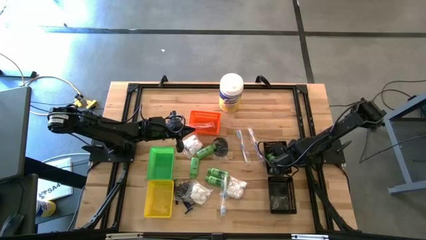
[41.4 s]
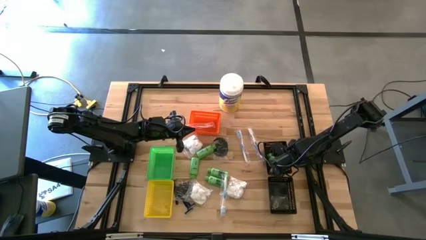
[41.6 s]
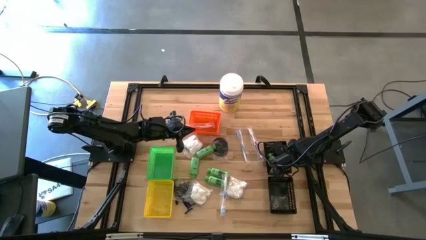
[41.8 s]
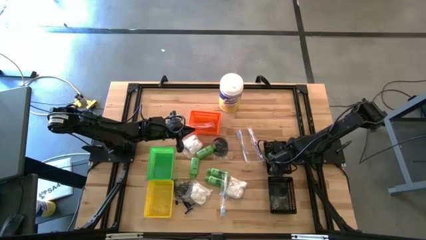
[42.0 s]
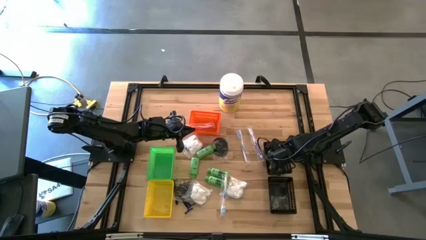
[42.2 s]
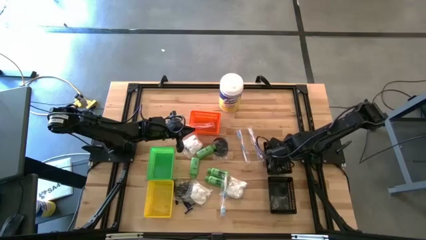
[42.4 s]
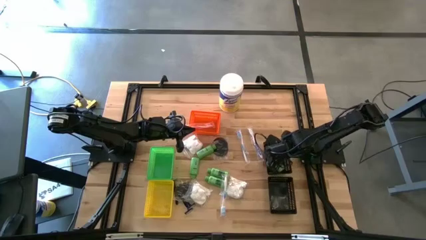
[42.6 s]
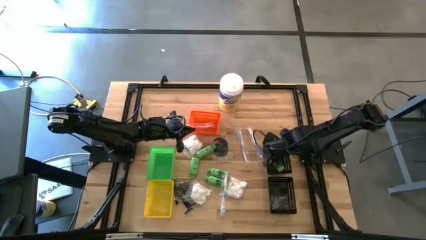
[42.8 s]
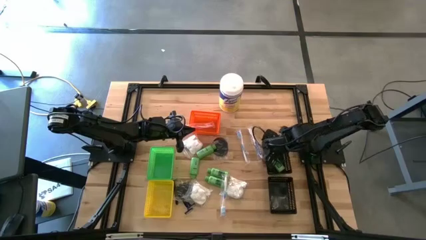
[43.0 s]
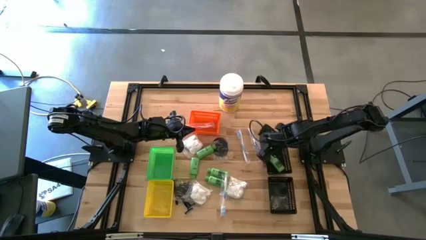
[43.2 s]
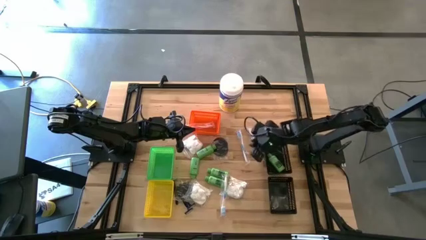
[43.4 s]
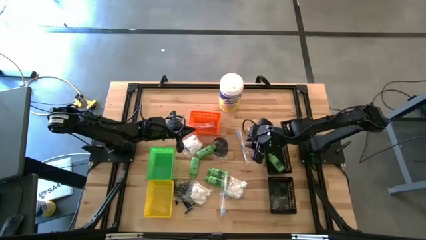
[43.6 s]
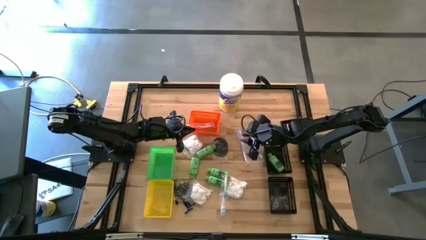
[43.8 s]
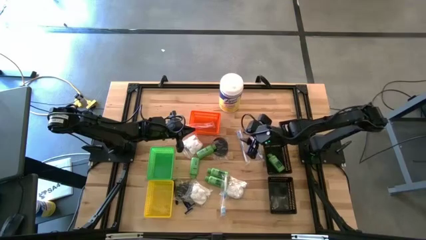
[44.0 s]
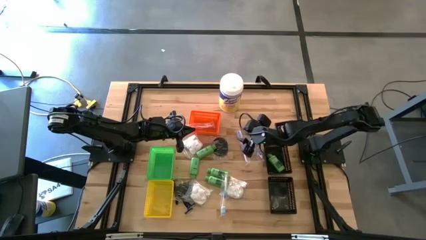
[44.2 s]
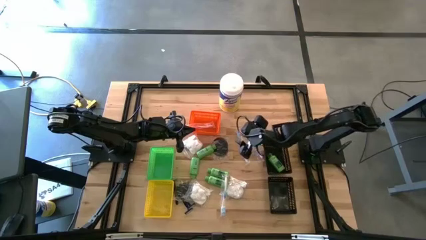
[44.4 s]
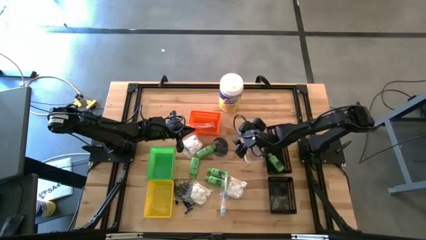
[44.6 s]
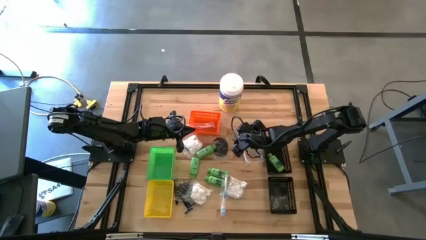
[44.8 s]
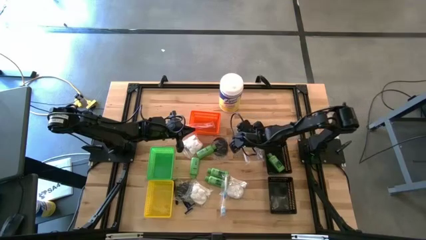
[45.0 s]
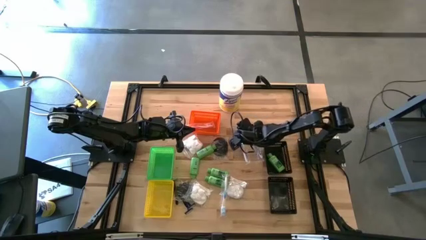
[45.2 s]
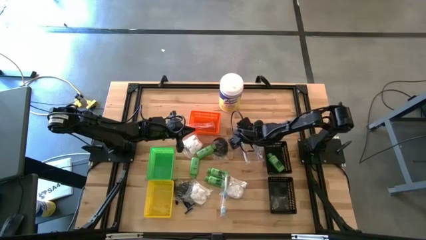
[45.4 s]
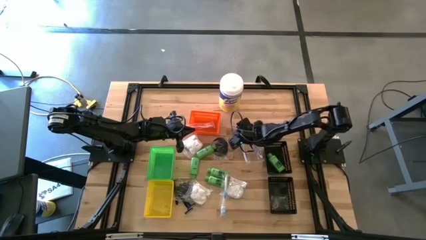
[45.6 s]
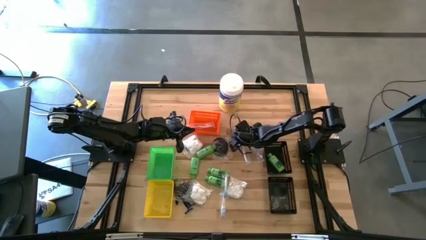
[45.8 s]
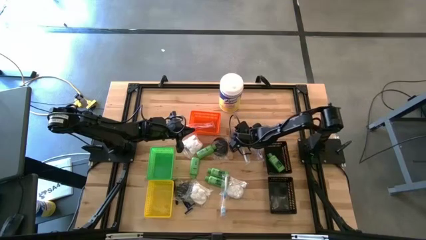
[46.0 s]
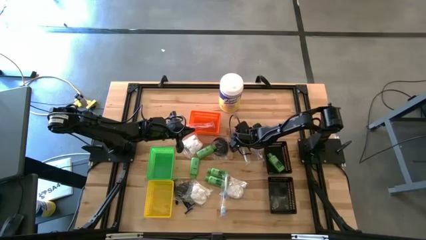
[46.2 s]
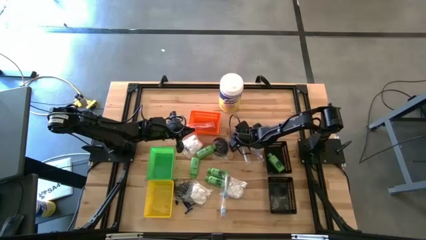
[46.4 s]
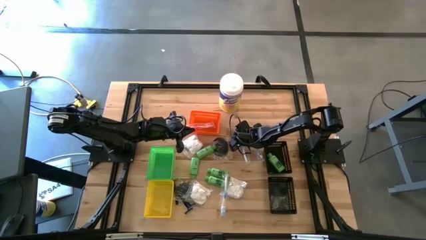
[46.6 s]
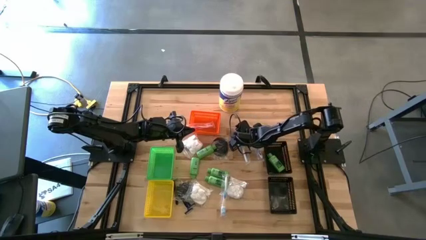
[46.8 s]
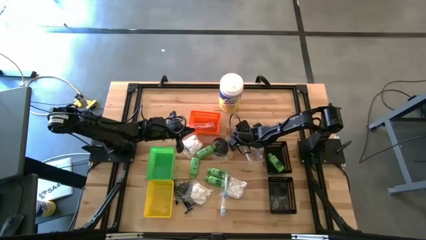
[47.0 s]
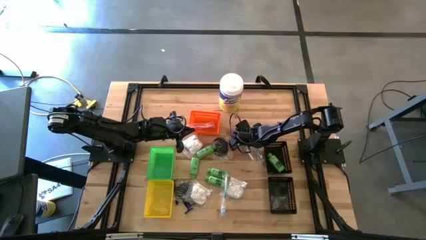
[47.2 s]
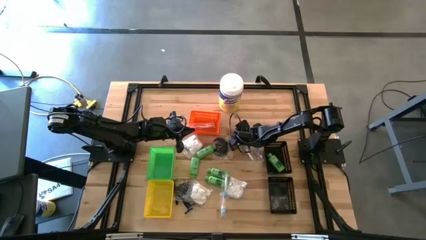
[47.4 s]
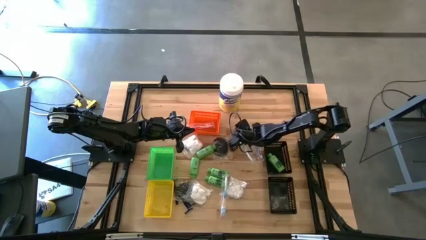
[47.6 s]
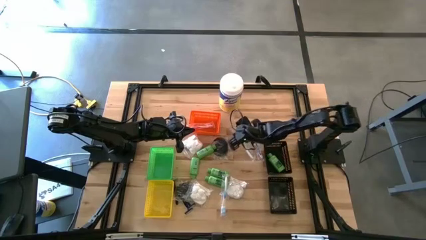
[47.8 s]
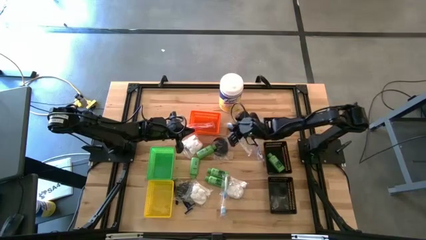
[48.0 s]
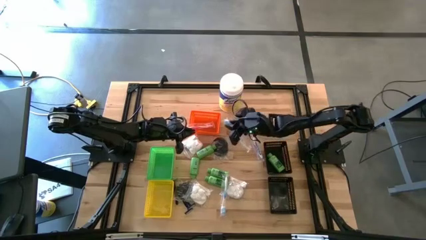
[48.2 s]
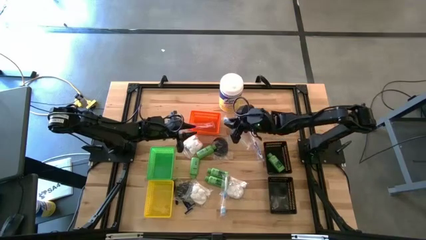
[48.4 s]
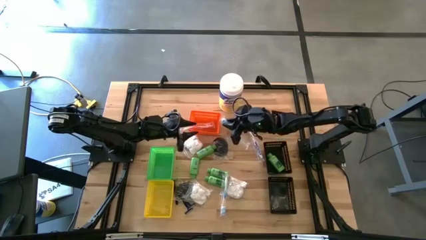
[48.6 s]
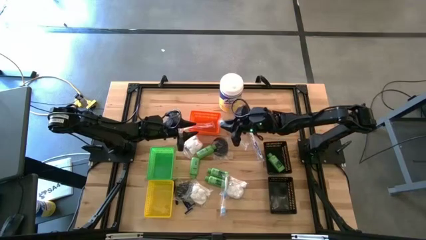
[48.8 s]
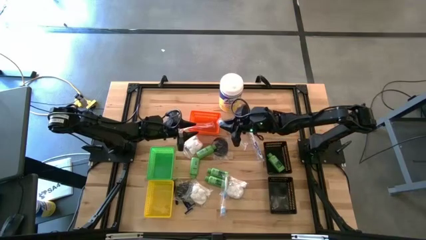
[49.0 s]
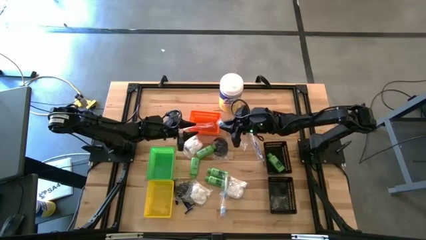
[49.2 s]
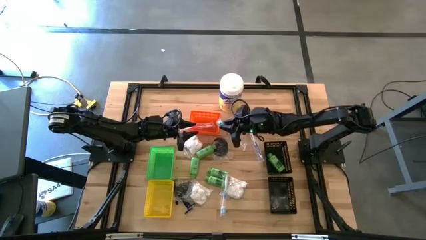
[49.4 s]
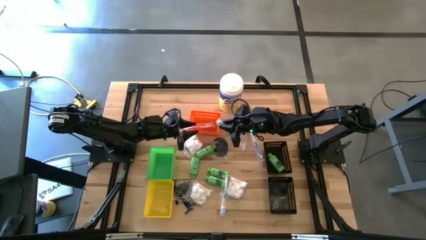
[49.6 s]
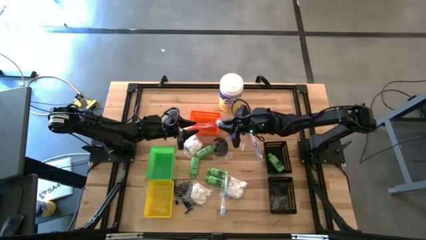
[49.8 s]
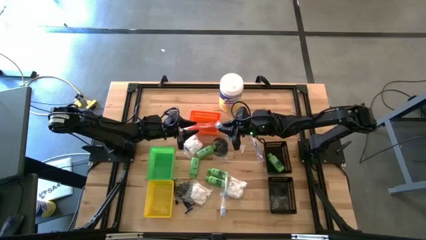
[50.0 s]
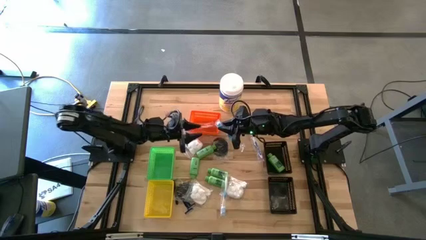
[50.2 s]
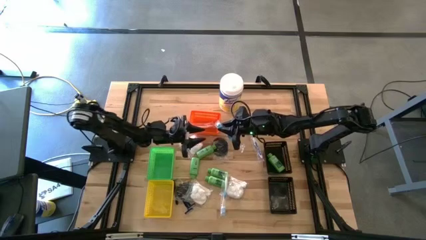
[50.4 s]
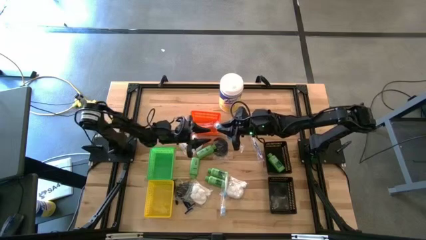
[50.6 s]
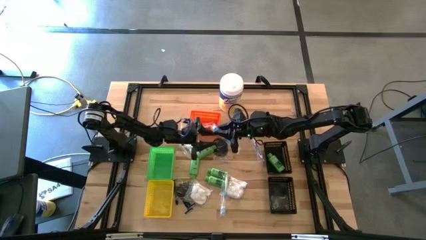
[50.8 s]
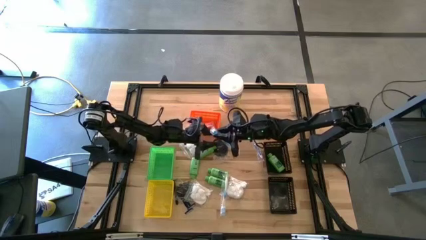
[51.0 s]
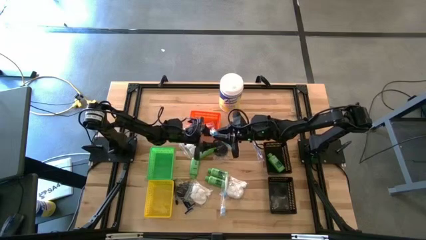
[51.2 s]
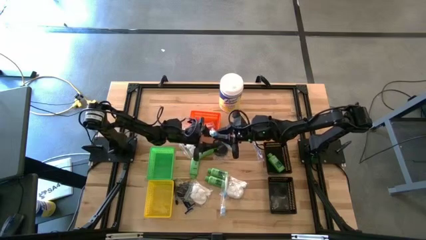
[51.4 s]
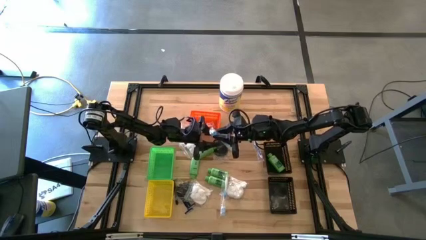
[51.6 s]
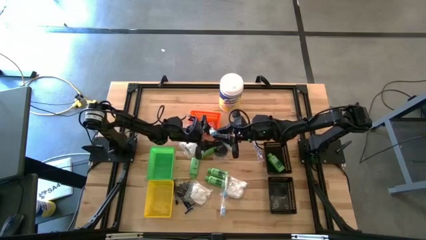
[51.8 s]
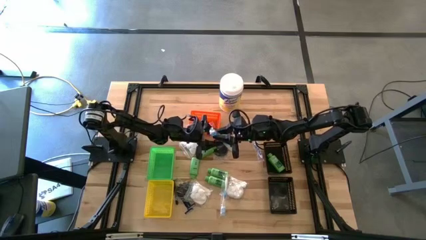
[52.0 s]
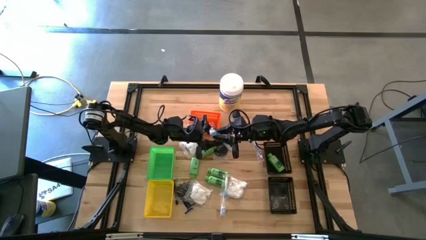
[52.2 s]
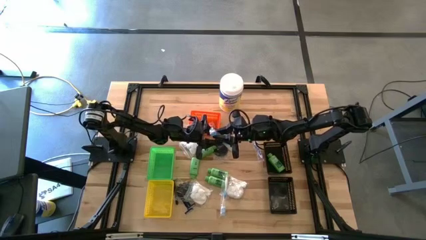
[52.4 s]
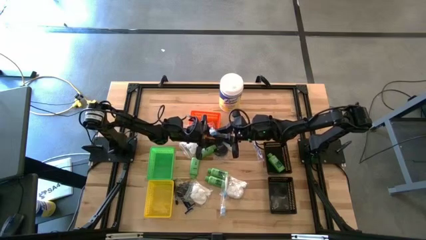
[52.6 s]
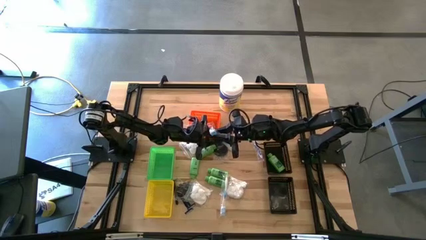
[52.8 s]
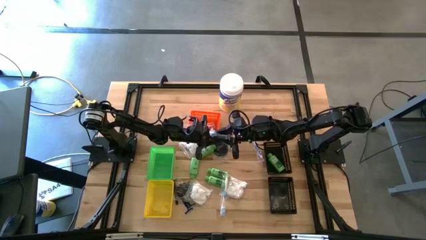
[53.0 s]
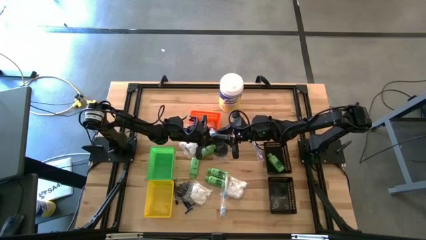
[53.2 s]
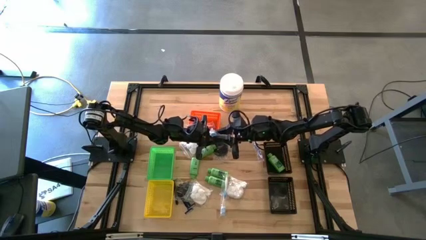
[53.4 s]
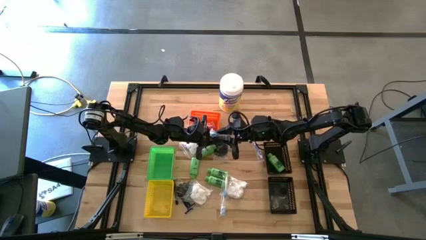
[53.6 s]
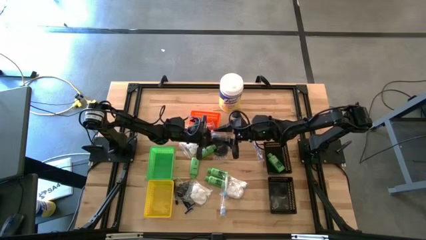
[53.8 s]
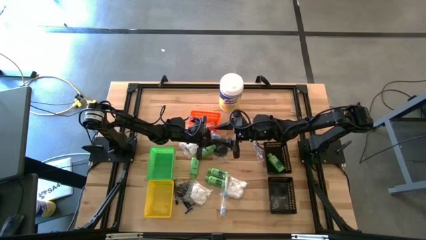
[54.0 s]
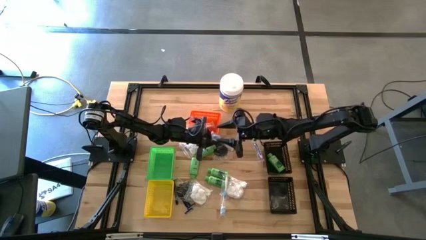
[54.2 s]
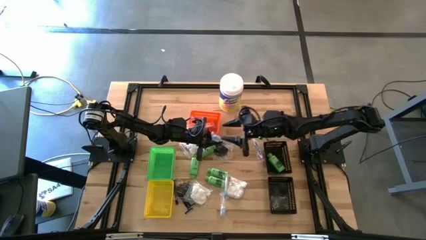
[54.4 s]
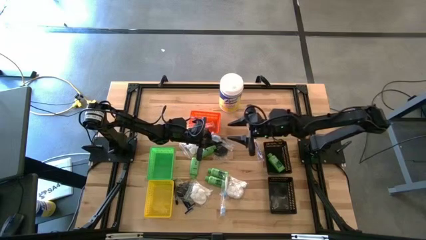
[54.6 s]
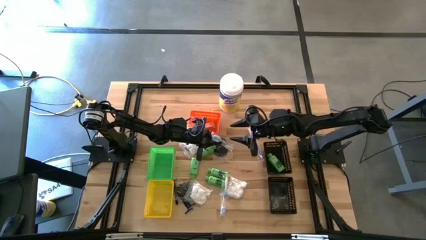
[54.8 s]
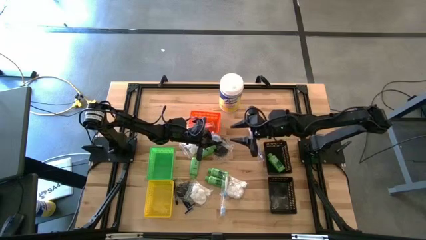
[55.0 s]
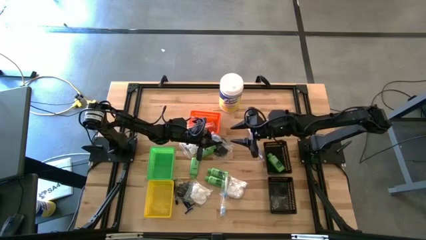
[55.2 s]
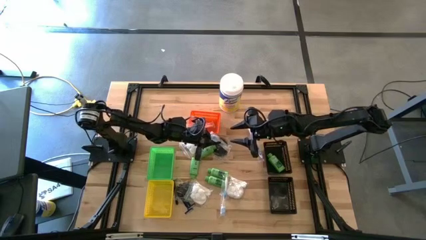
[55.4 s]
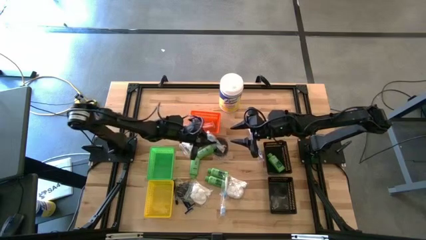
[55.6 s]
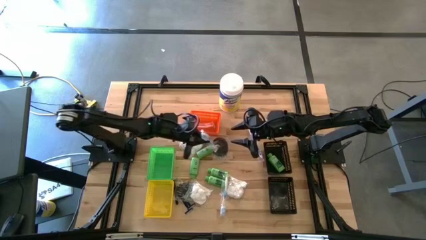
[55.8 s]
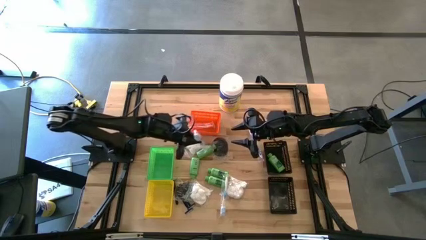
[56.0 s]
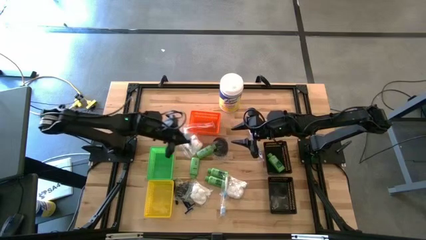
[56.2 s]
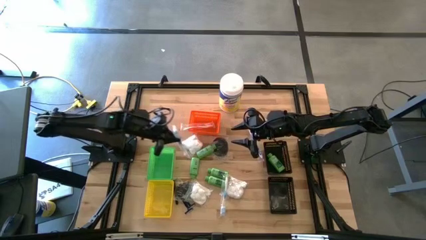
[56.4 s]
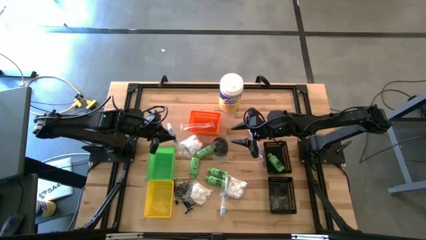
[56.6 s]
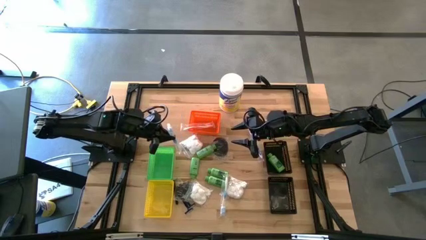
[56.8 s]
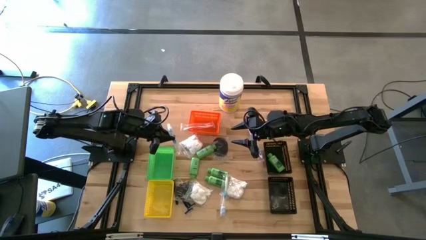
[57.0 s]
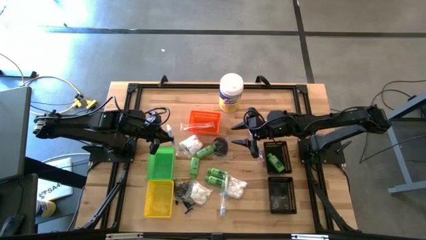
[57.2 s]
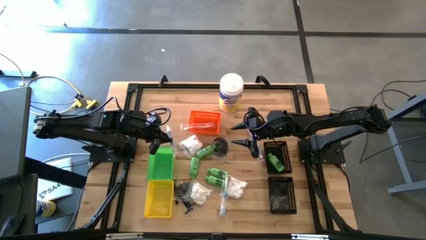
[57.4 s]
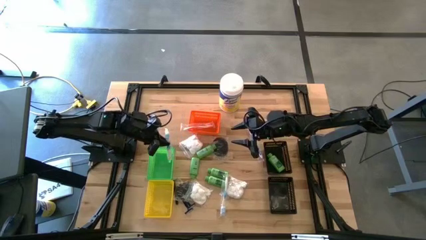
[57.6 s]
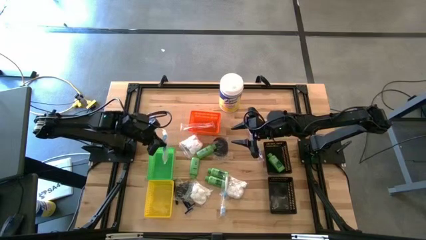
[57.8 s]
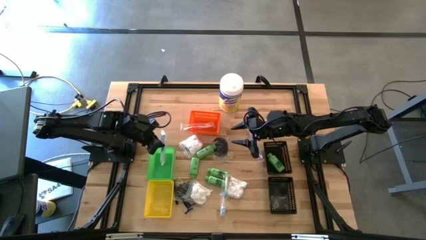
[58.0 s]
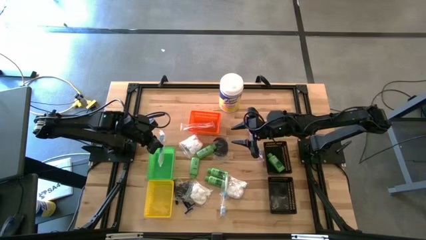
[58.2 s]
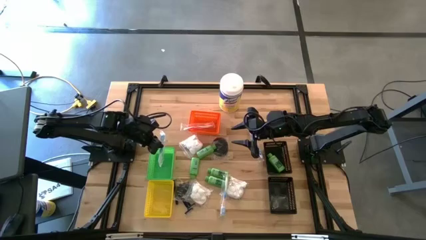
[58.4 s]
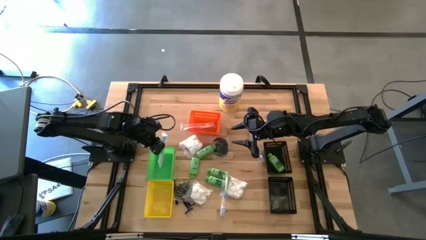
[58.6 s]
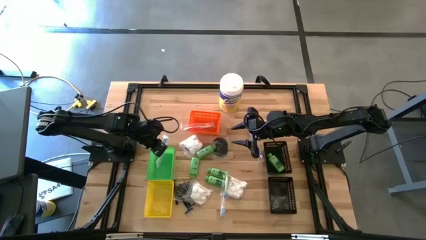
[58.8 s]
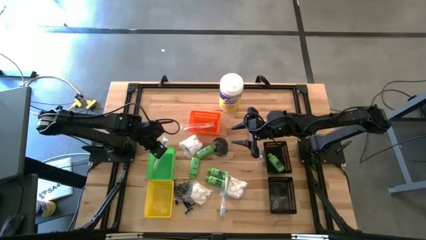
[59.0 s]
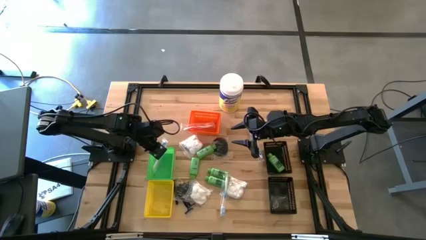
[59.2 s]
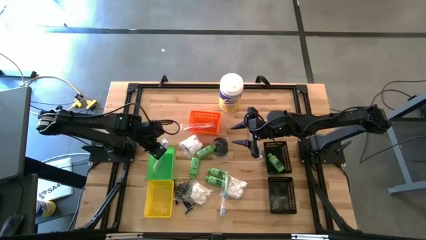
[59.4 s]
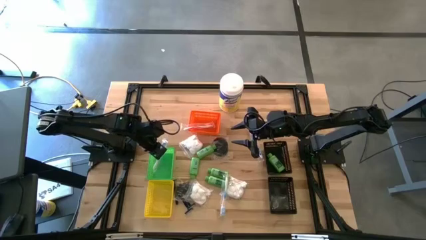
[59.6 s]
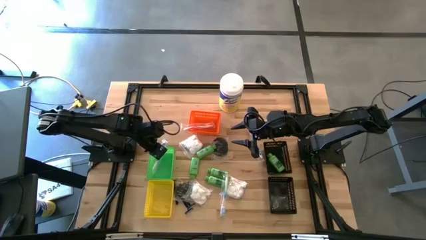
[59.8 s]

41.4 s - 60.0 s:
Task: Pick & Place Travel size toiletries
Put the blue toothbrush into the green bin
